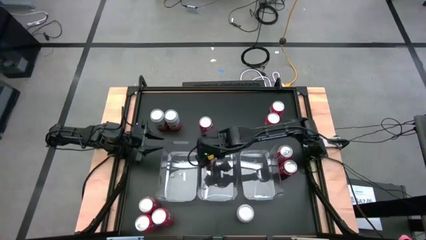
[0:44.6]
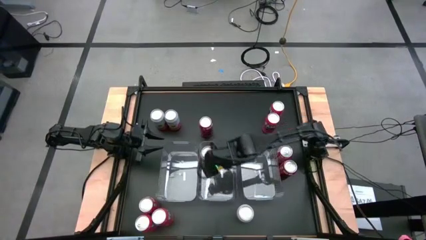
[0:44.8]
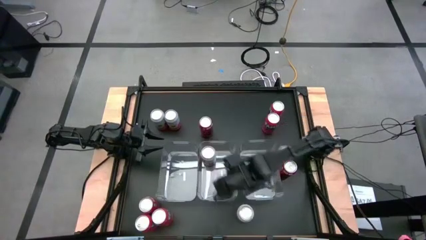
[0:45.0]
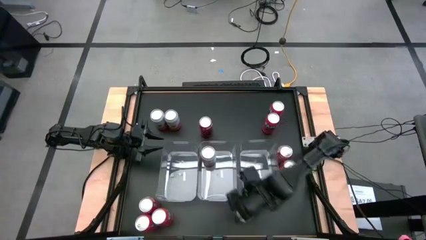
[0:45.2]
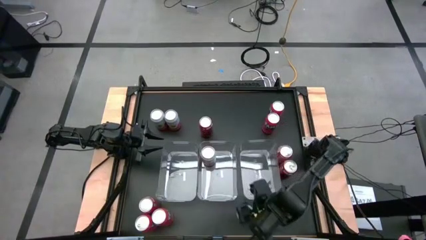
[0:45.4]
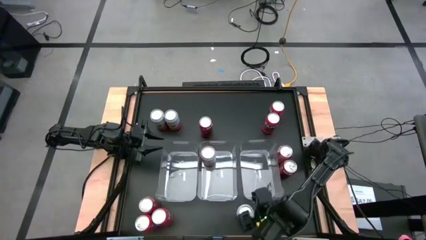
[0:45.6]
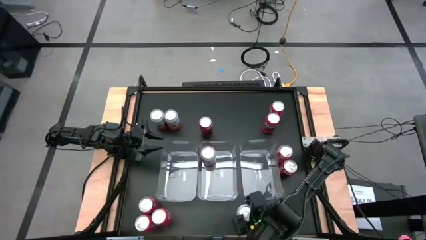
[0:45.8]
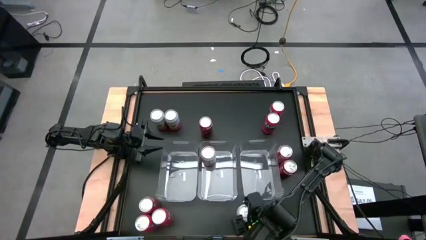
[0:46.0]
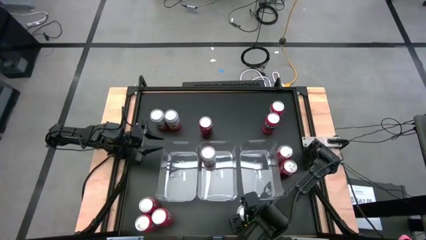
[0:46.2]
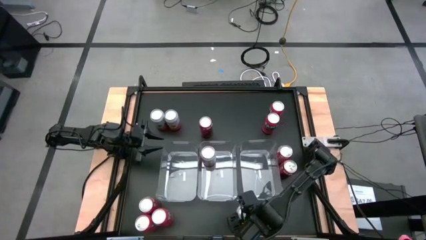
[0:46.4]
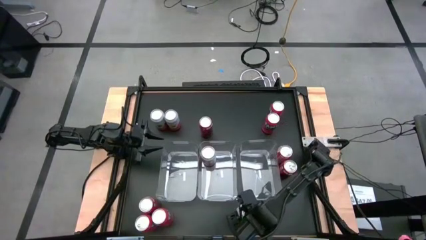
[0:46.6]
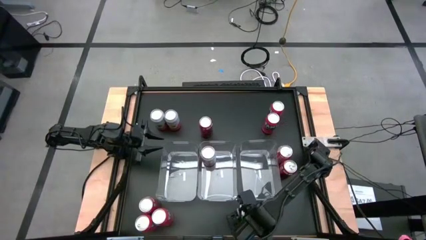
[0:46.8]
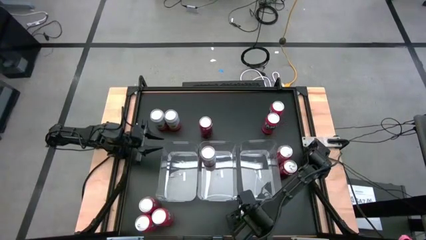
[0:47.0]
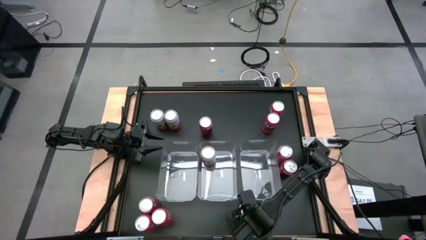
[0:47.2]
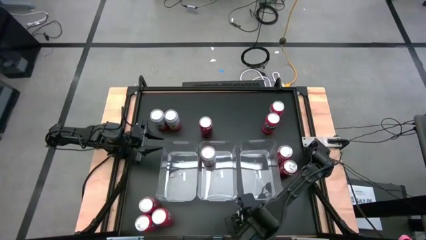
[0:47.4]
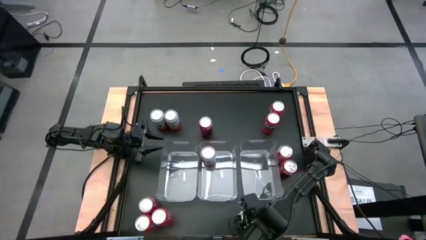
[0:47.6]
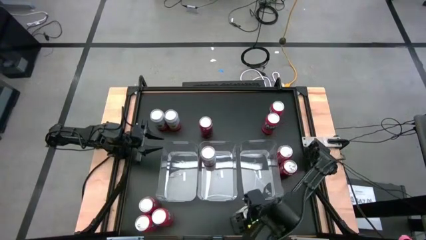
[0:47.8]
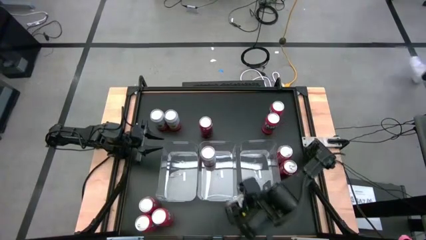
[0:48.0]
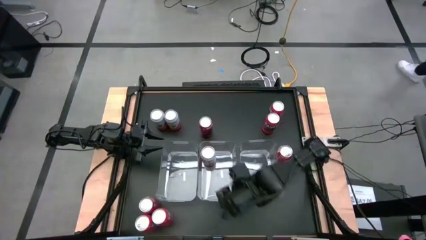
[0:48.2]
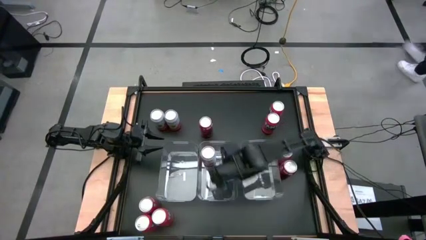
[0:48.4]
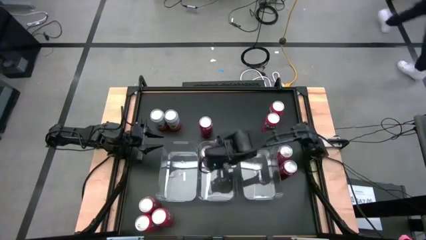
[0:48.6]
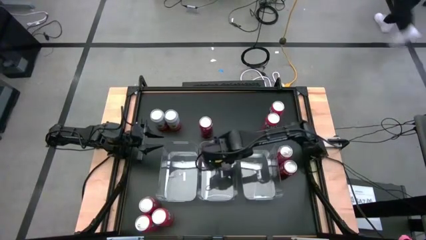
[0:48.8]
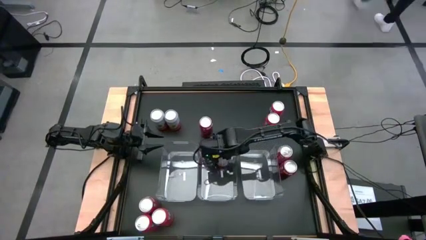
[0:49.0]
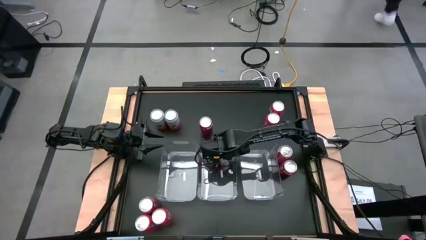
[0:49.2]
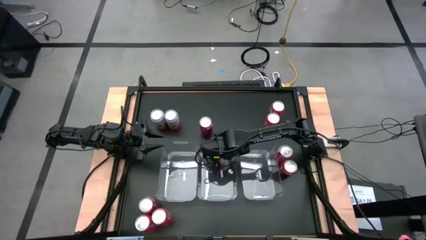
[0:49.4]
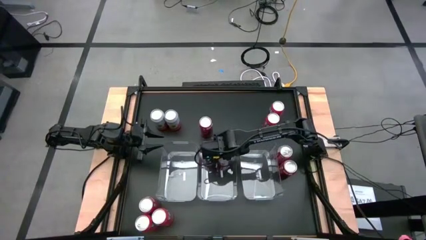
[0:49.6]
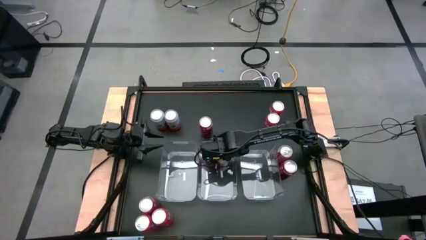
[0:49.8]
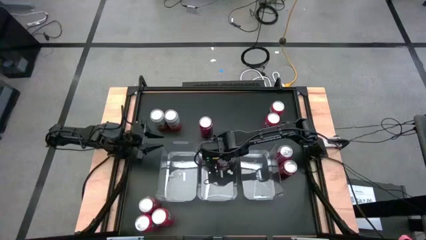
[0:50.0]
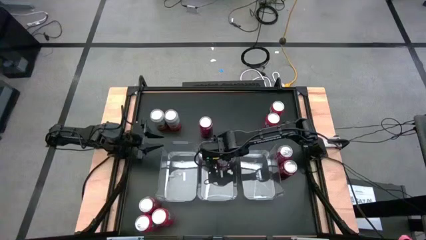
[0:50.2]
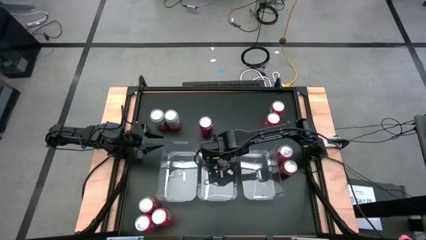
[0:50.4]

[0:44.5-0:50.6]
Task: Sort soda cans
Put the pink-white soda can into the center transparent bin

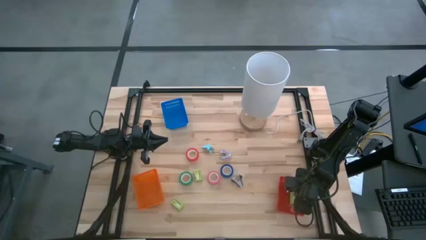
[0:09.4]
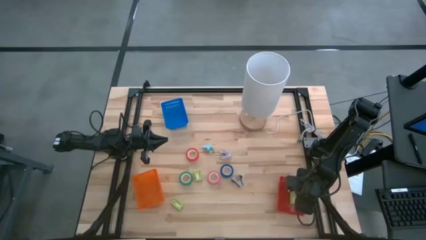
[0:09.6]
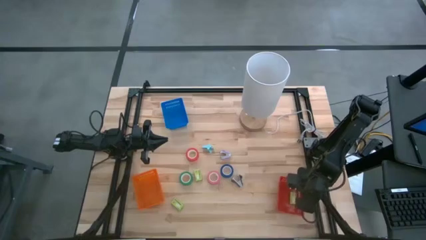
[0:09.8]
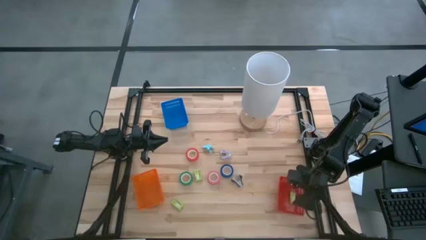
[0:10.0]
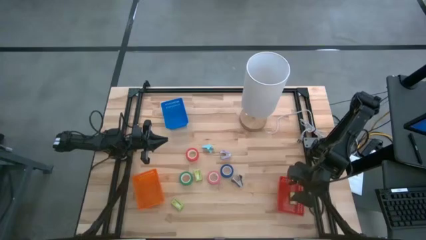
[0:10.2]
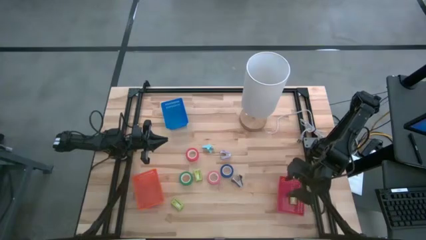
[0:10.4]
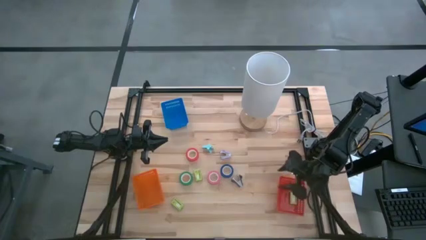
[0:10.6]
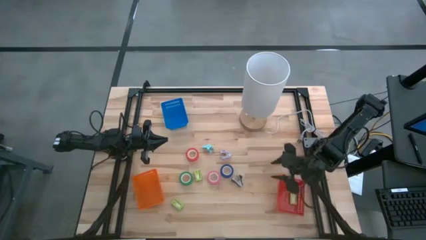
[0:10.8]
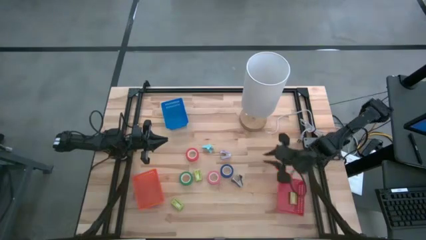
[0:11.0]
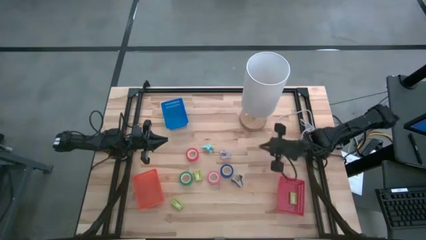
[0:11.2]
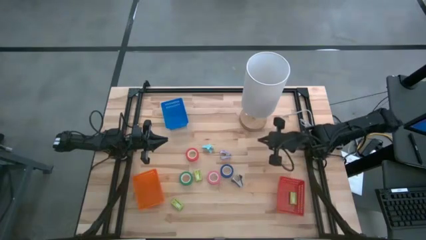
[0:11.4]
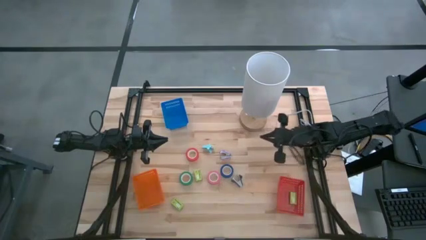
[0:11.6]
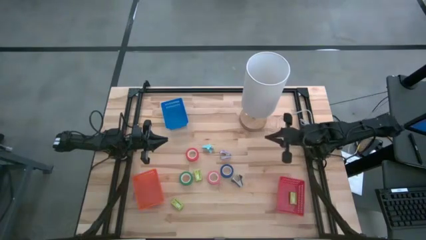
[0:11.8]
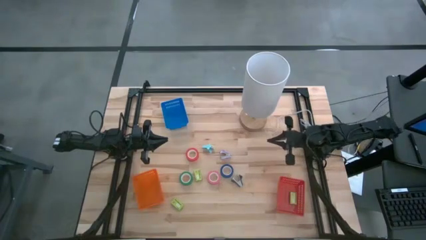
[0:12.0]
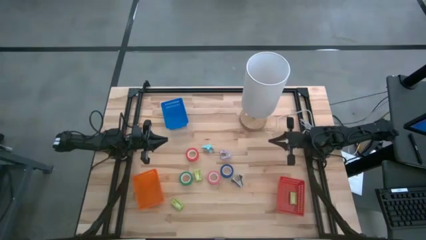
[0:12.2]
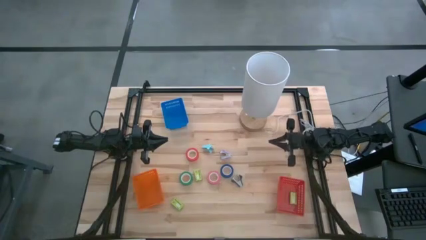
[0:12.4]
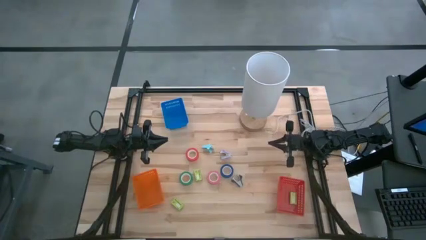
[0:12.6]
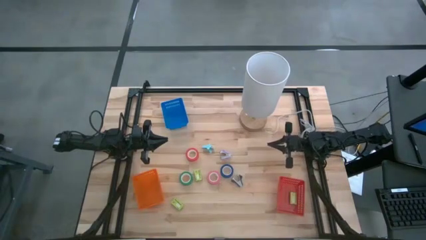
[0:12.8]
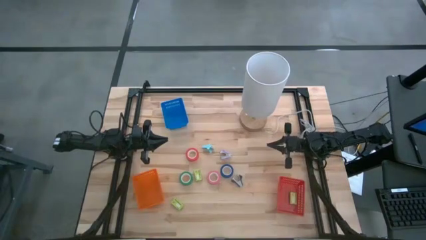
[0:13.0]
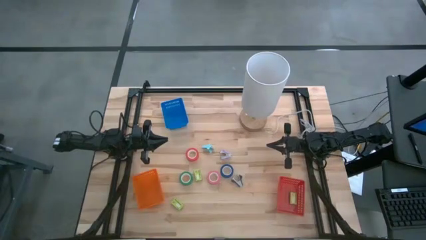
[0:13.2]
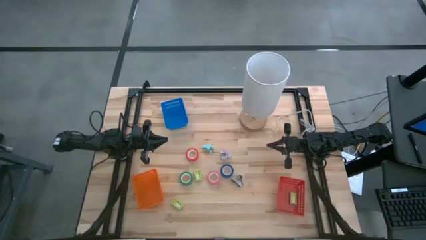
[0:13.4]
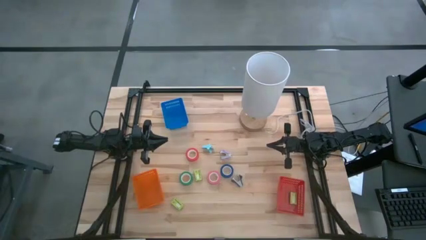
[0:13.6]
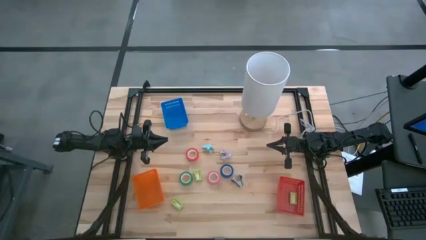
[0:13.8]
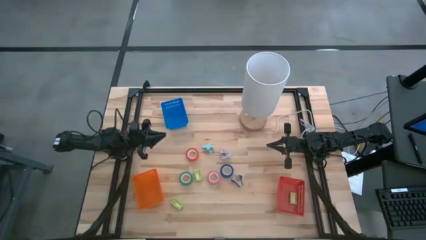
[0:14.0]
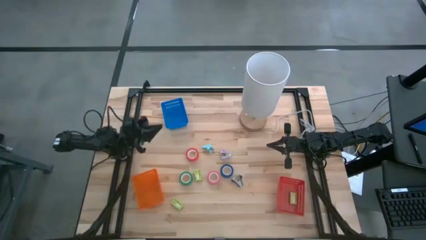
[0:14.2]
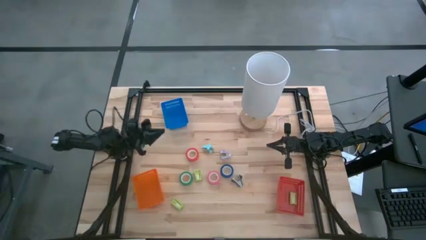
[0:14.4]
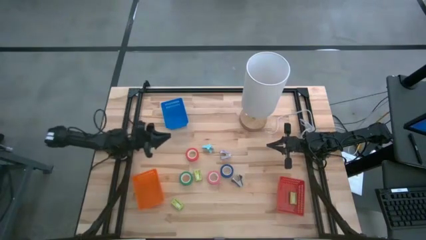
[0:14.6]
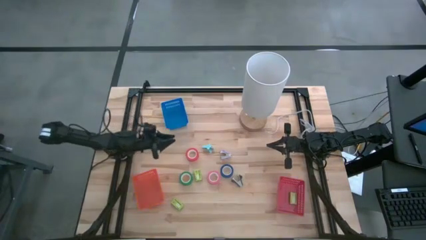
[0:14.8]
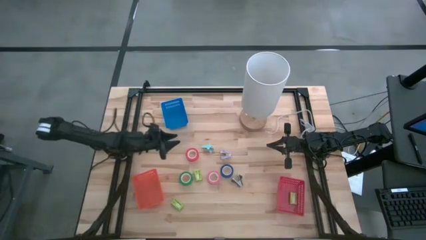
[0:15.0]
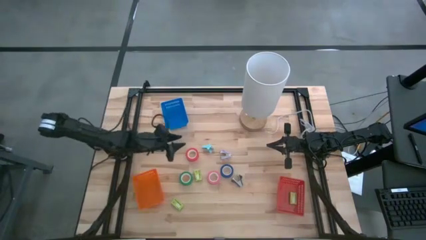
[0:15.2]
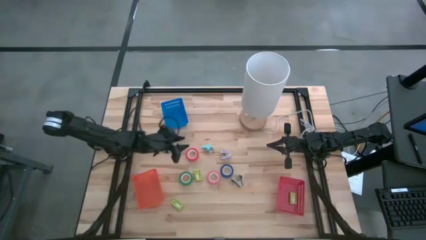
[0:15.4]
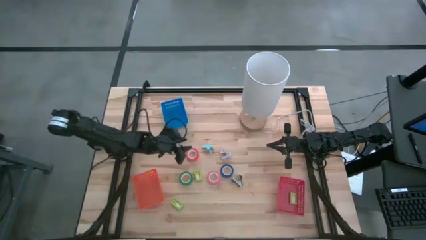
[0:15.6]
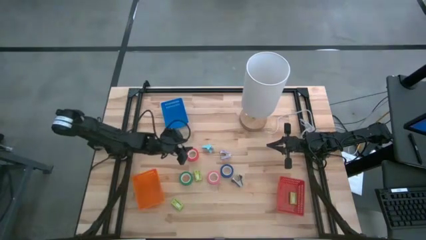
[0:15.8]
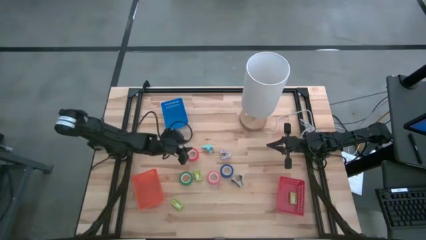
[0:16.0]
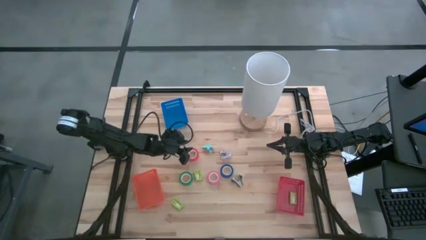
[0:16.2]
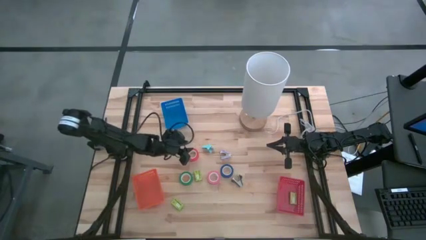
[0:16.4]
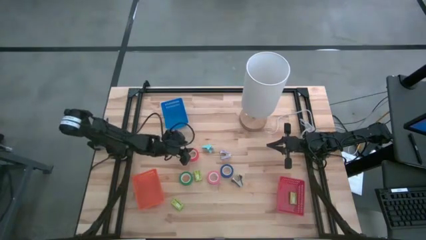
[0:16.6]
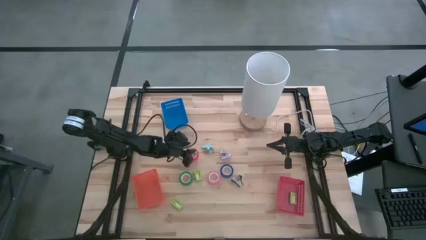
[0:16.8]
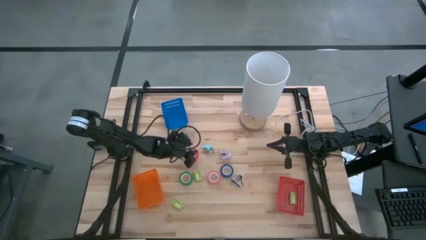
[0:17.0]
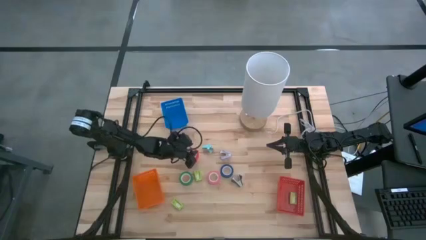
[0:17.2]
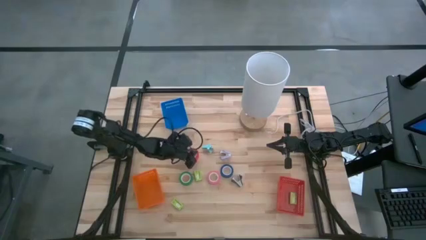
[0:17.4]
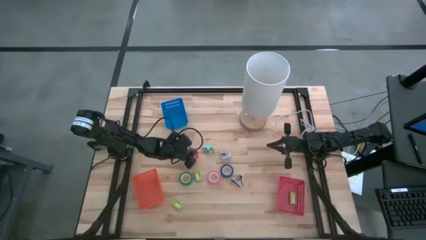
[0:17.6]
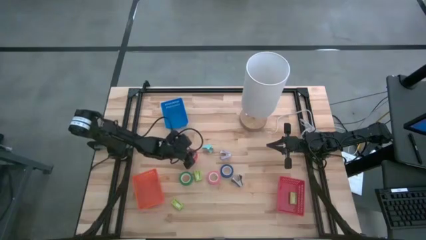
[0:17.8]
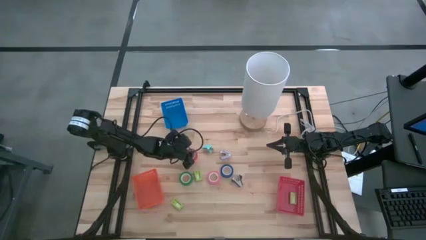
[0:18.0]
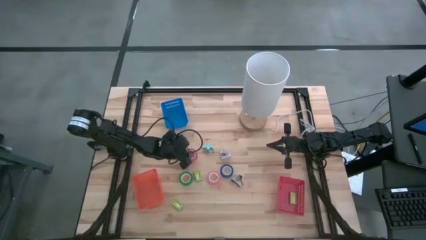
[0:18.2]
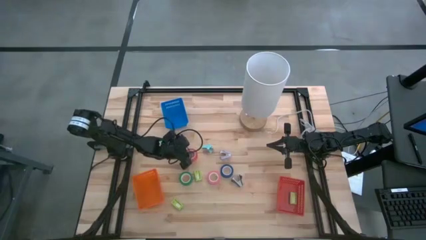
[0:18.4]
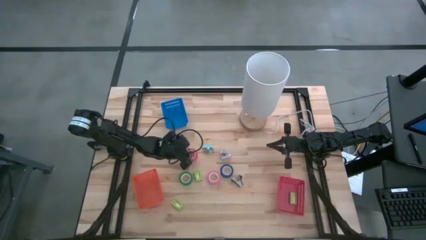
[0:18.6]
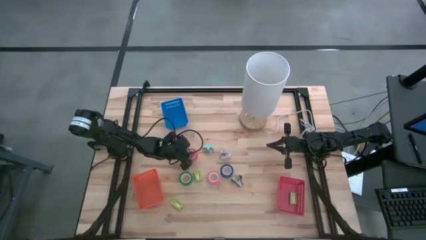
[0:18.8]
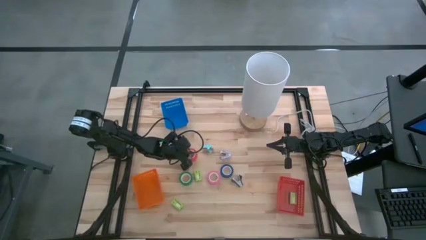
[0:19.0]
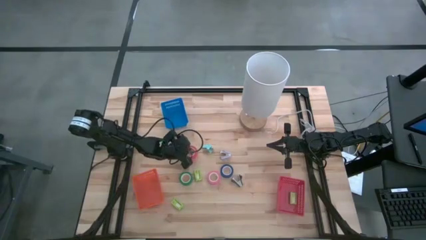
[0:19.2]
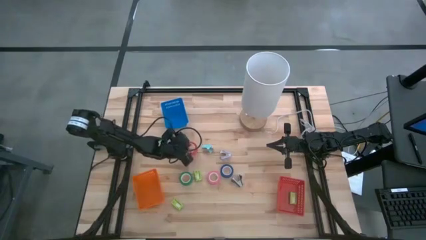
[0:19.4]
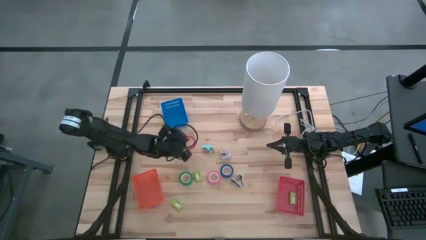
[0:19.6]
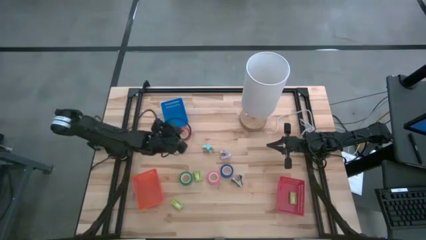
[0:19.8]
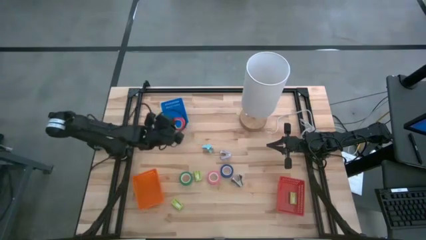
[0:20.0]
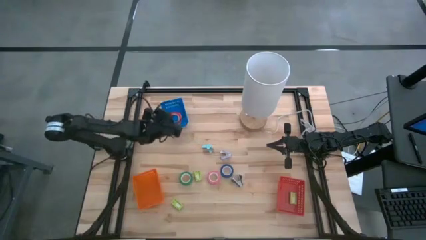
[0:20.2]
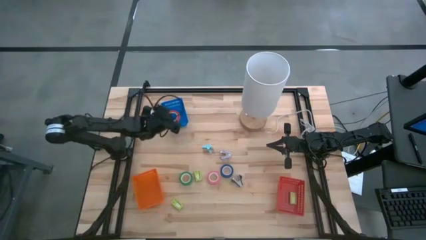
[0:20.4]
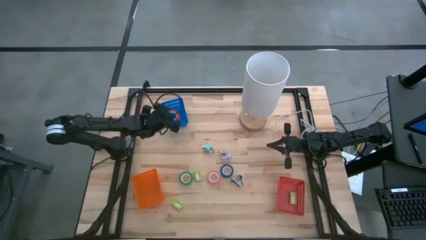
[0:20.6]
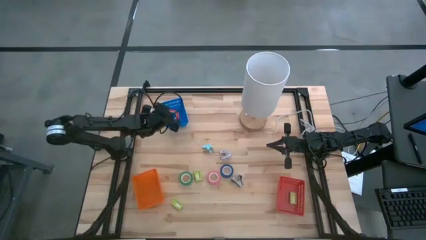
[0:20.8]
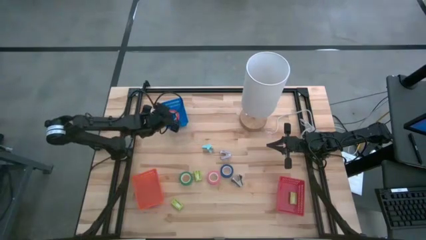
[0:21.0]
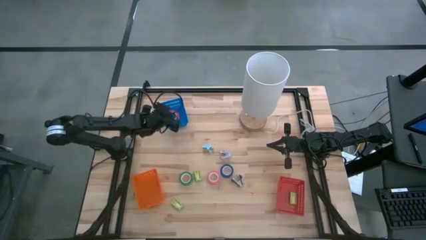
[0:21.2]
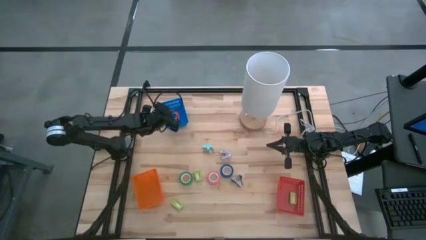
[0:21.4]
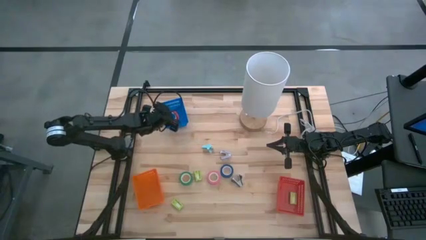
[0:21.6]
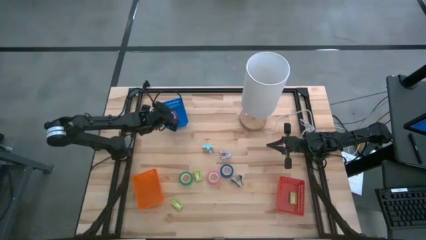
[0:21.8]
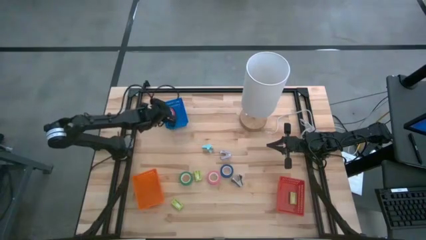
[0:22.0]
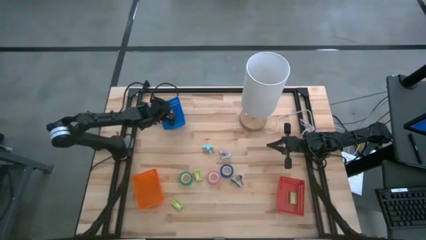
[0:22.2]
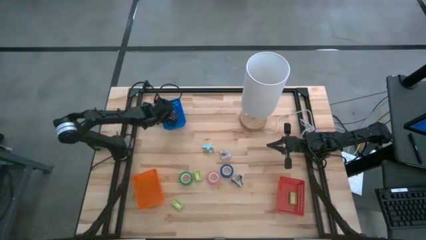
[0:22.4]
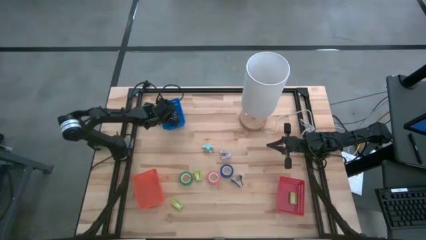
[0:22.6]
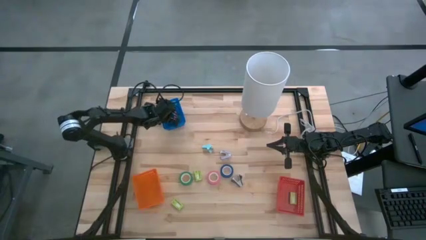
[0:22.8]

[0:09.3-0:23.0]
Task: Pick and place Stapler, Stapler remover, tape
Put the red tape into the blue basket
